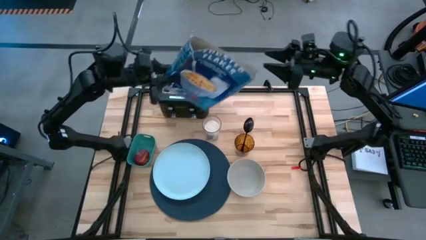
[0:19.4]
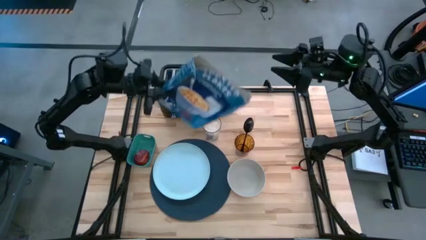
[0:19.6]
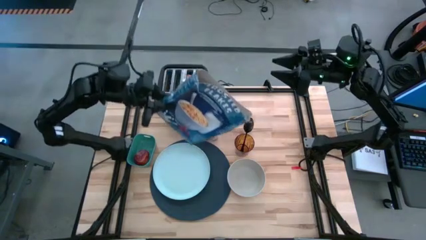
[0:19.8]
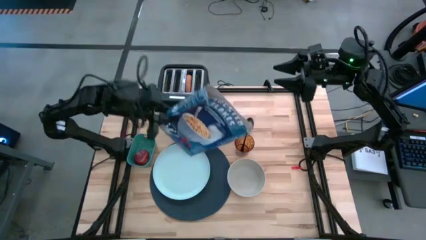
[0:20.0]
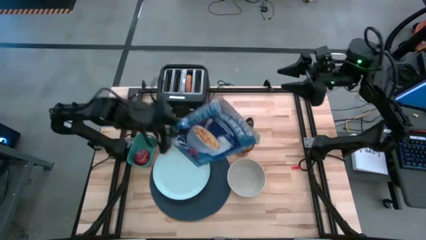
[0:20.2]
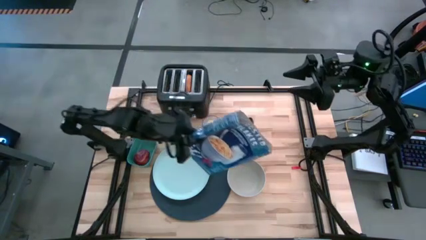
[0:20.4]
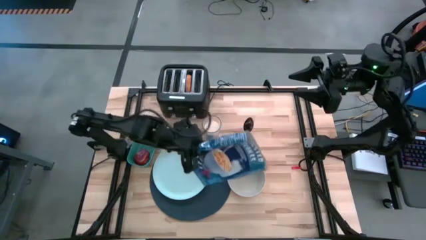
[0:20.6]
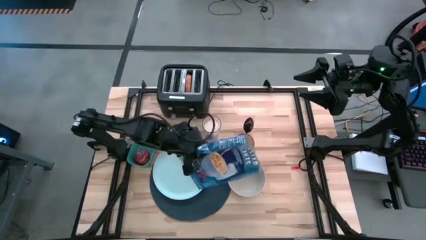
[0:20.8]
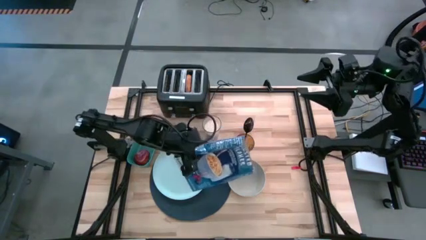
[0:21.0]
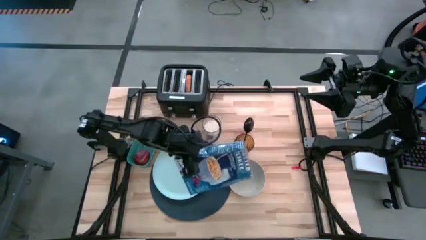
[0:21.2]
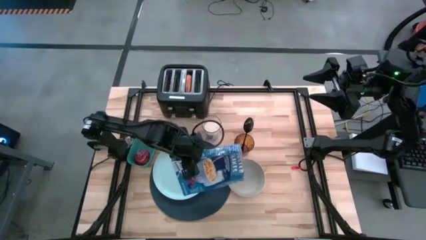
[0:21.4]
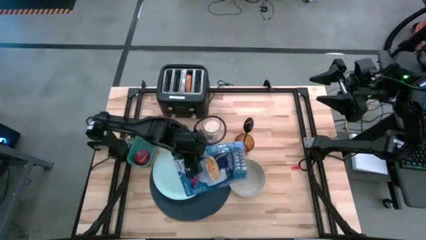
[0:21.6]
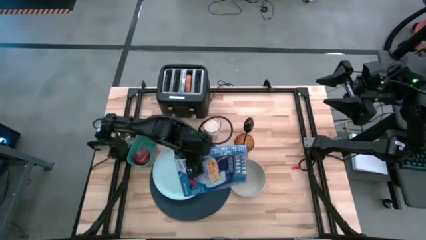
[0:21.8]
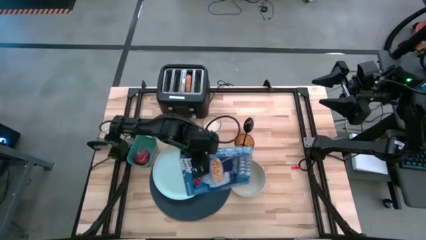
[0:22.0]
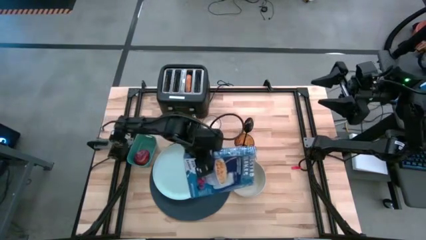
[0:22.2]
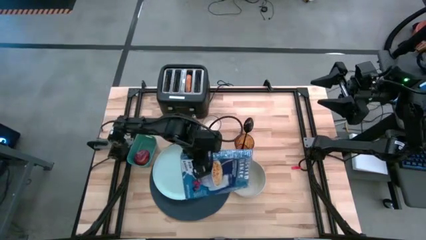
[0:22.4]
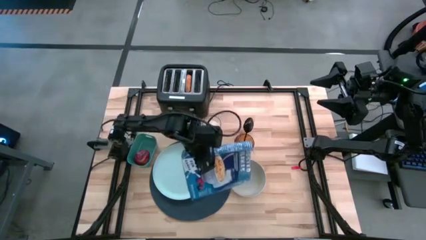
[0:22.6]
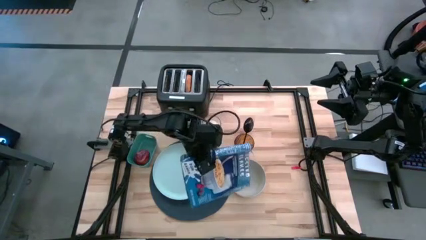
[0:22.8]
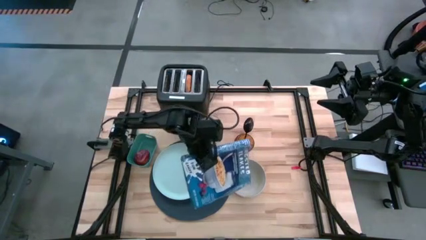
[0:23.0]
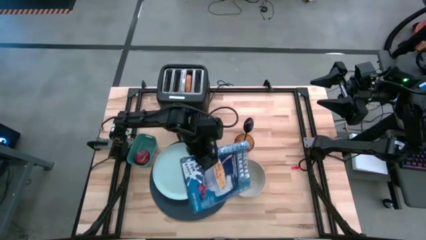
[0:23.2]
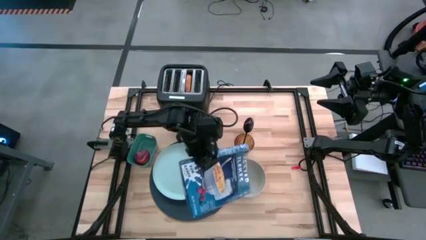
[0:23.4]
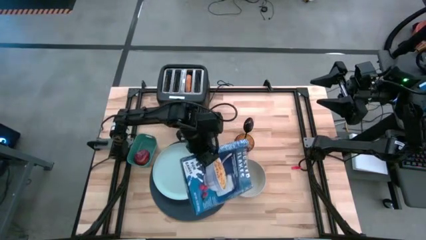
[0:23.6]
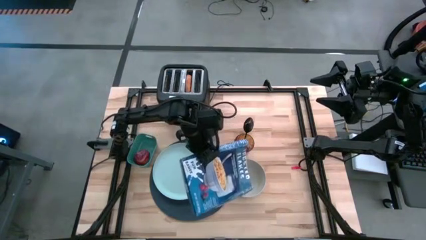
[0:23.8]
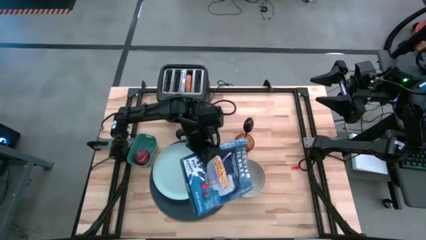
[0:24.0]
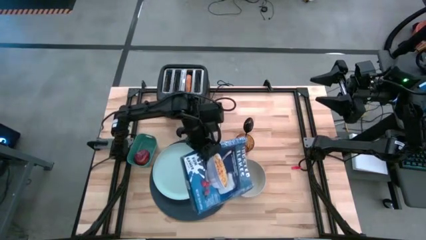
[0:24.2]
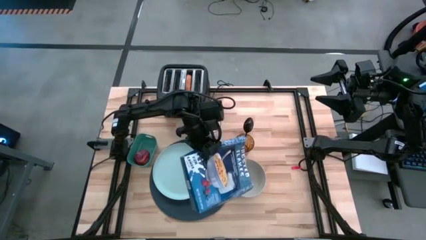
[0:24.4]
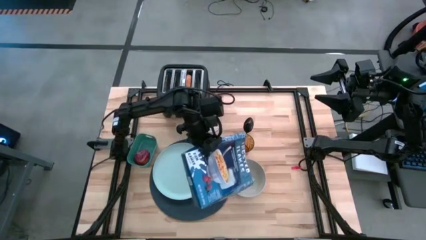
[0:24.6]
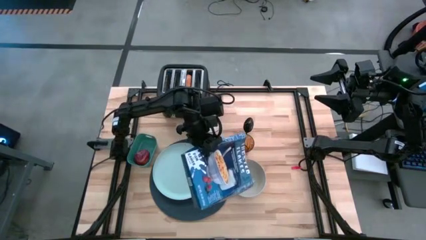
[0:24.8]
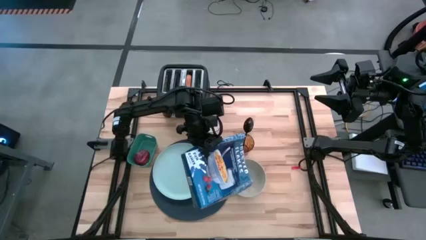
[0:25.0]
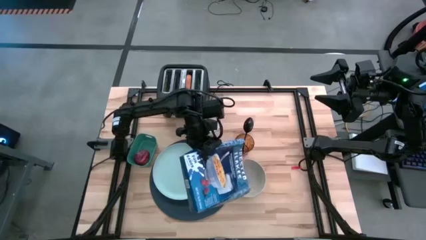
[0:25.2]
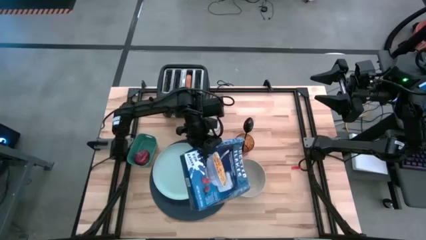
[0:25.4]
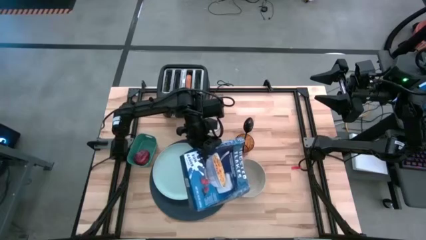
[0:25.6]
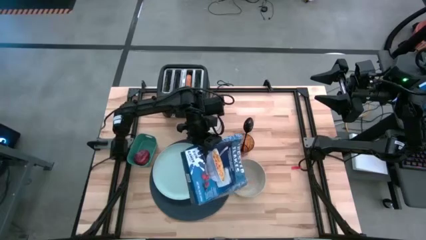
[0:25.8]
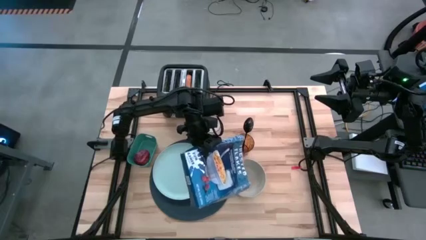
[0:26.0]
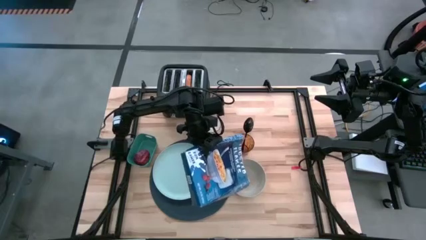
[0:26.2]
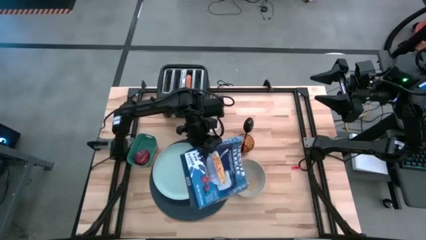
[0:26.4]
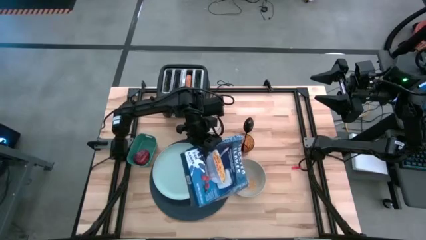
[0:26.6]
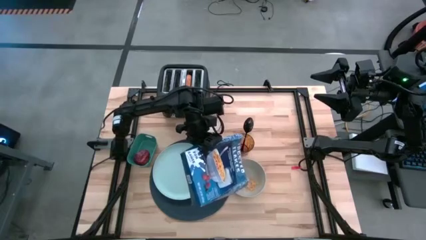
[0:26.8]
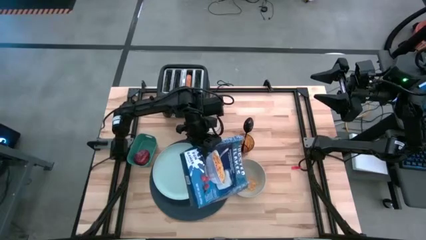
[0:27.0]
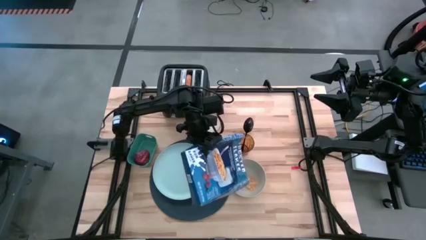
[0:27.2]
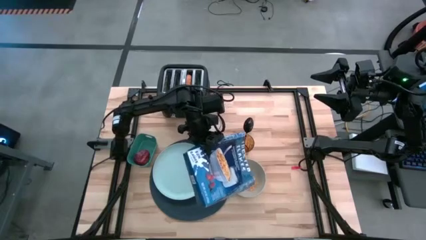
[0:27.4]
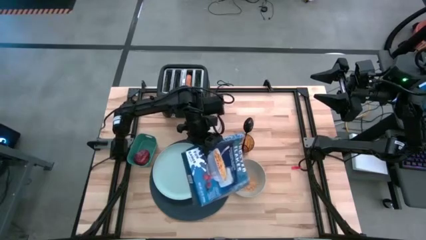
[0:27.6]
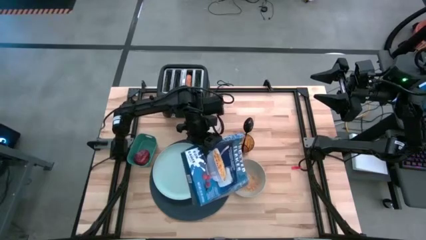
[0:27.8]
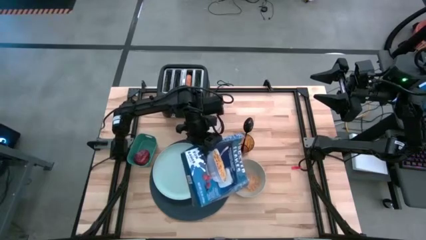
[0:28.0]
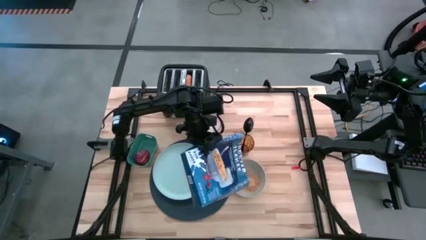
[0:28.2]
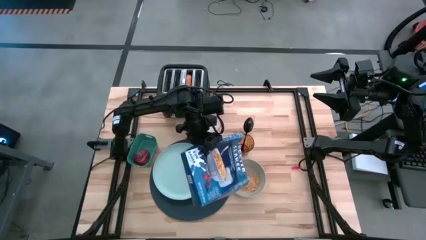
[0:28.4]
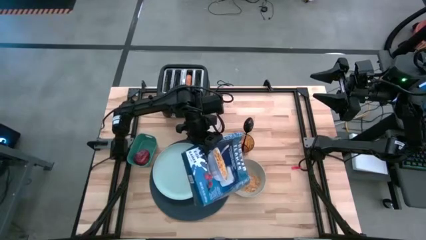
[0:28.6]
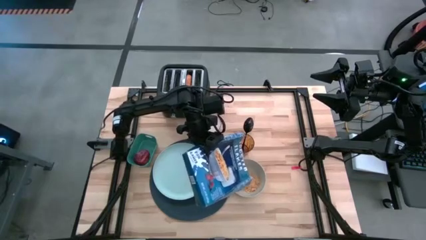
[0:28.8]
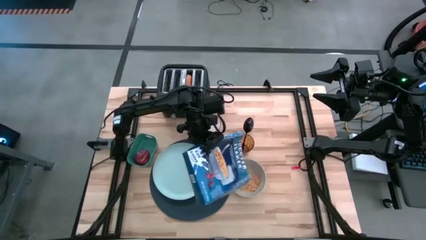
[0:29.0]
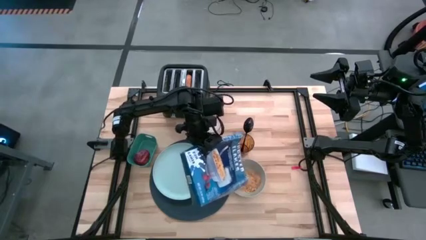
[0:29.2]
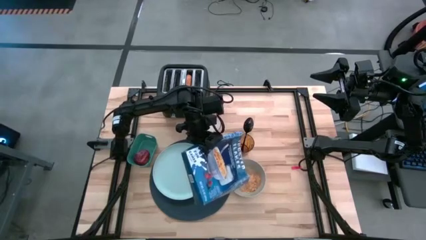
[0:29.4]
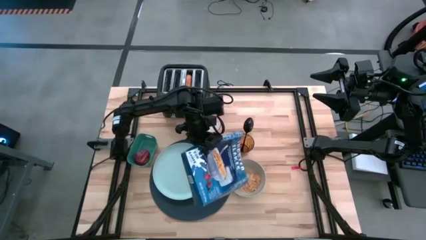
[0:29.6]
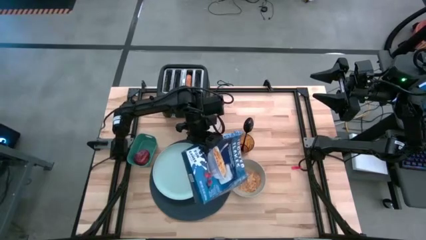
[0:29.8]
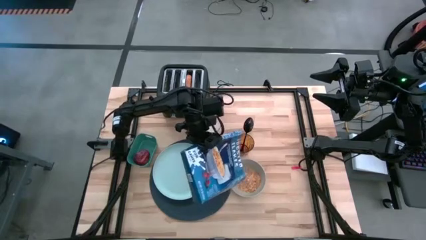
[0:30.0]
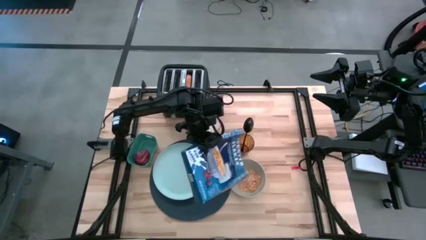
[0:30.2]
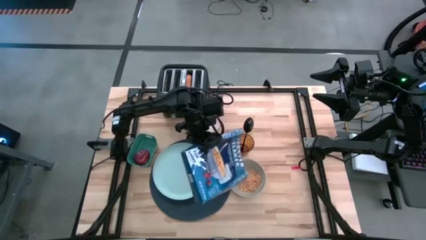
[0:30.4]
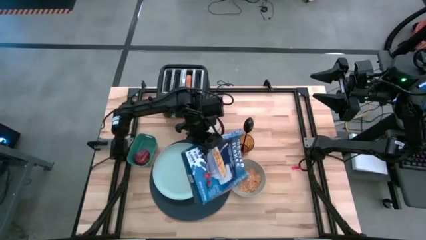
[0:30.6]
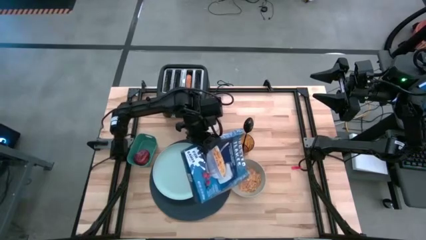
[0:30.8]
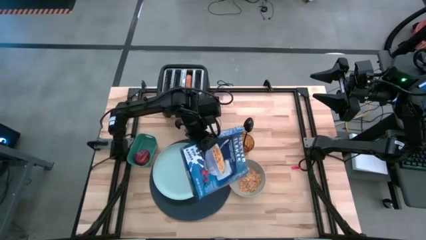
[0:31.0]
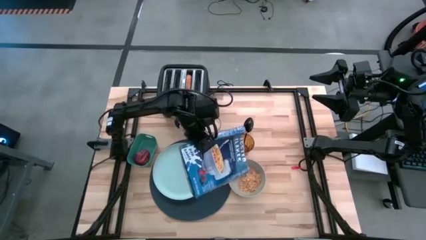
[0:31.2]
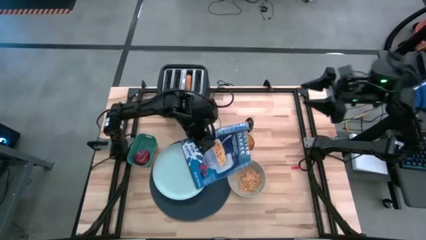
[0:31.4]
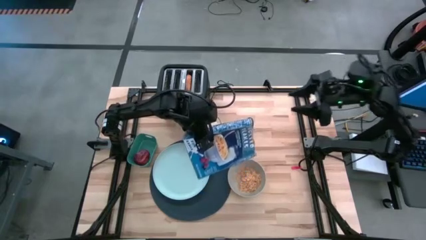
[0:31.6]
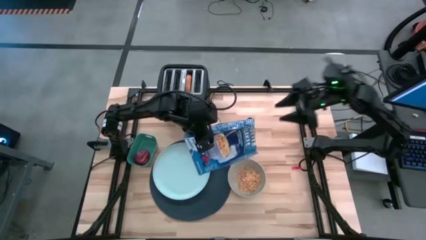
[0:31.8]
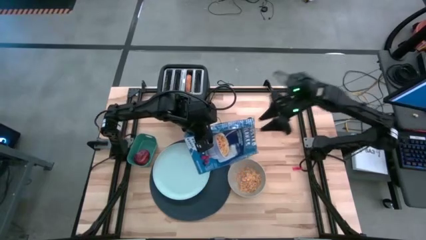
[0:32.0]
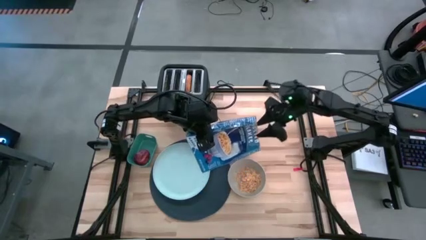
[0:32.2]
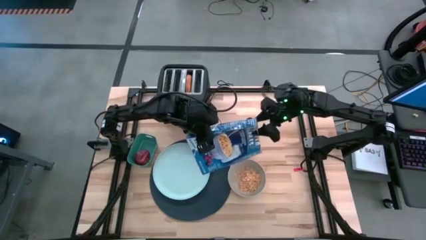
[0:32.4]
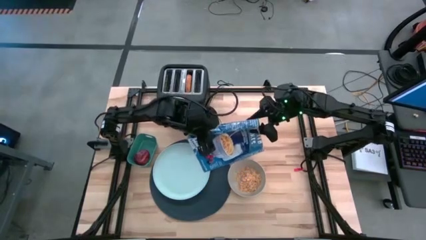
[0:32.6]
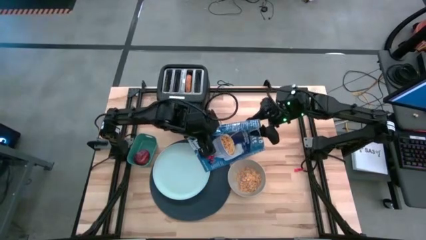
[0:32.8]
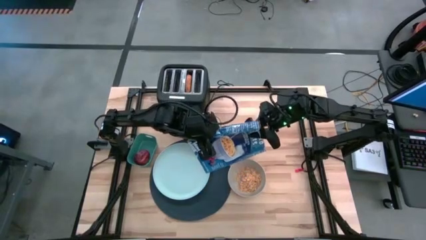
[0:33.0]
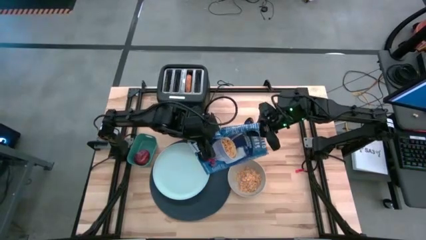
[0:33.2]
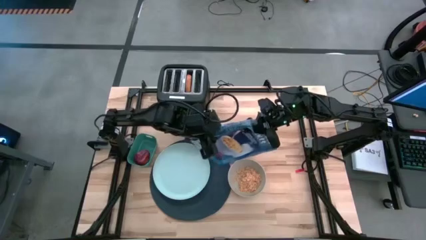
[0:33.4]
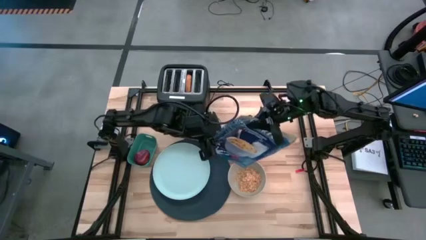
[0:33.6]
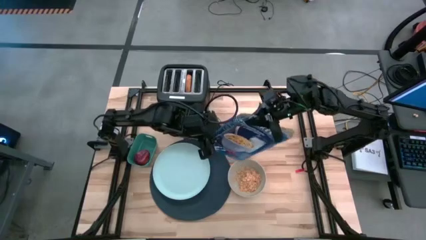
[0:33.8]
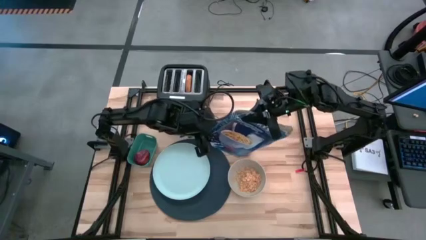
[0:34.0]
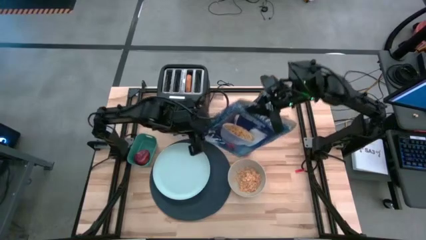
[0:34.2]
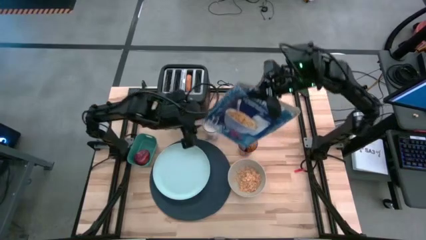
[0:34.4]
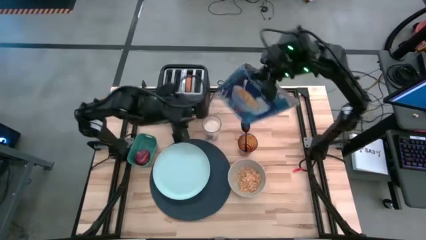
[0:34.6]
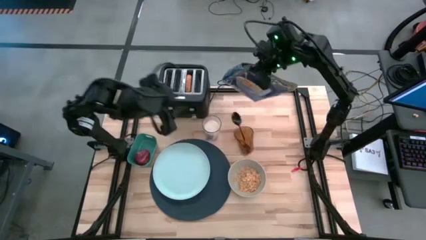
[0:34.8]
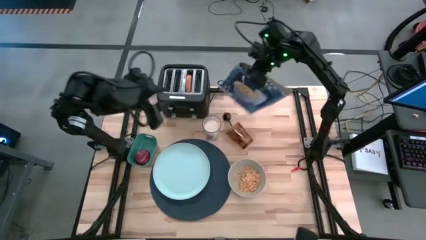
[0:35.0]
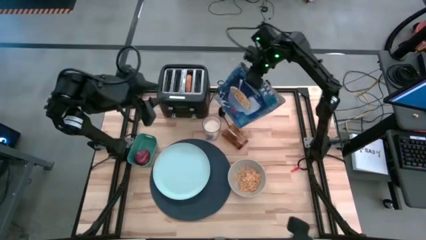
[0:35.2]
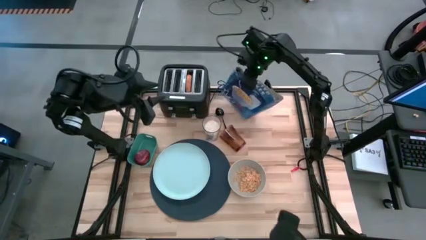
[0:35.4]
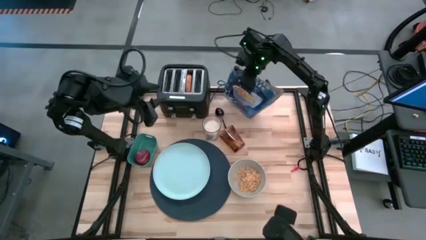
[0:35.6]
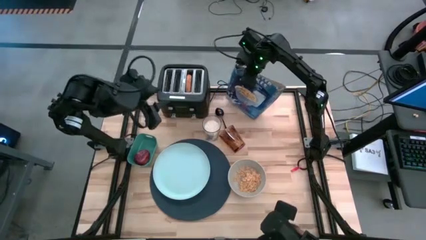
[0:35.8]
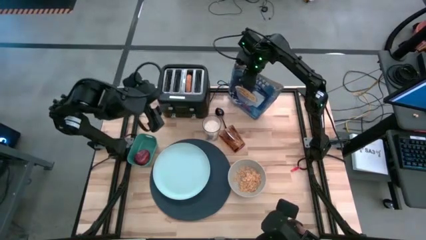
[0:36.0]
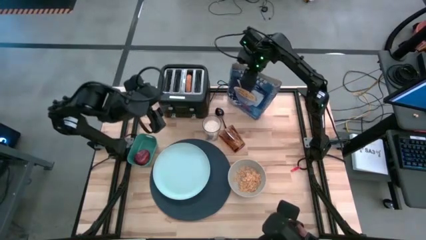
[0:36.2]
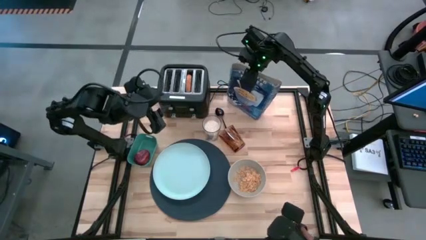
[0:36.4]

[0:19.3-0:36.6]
Task: Arrange a breakfast setting
Pour the cereal into the gray bowl
